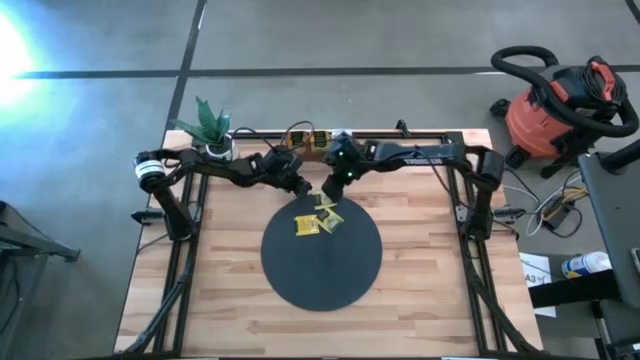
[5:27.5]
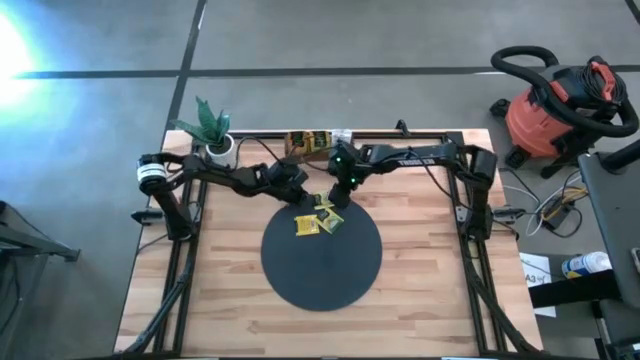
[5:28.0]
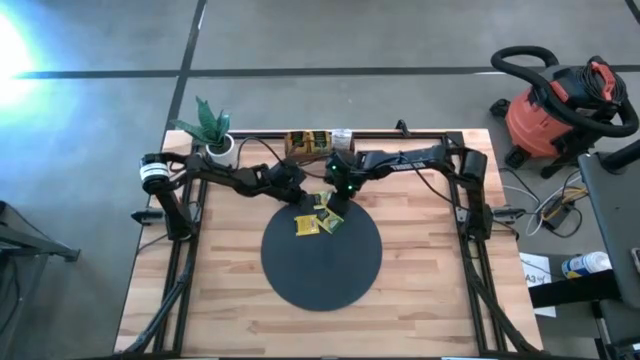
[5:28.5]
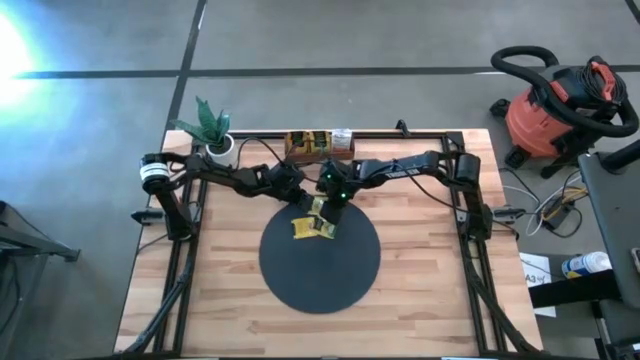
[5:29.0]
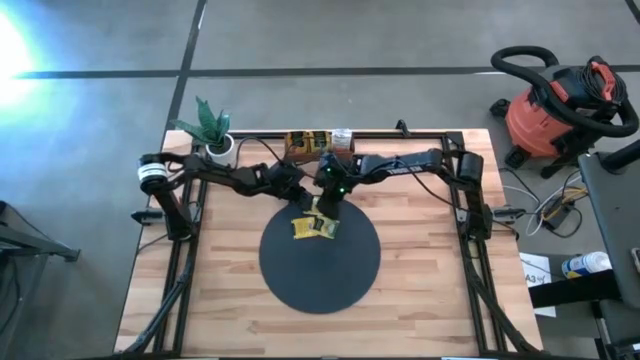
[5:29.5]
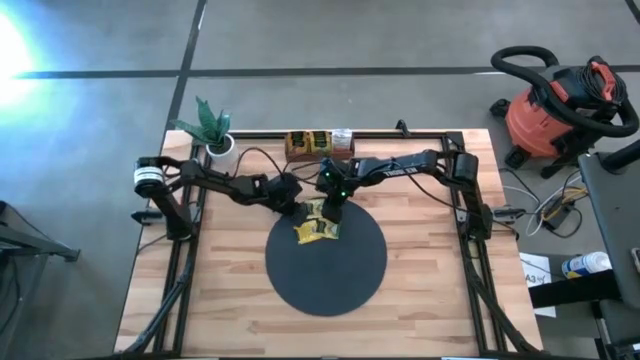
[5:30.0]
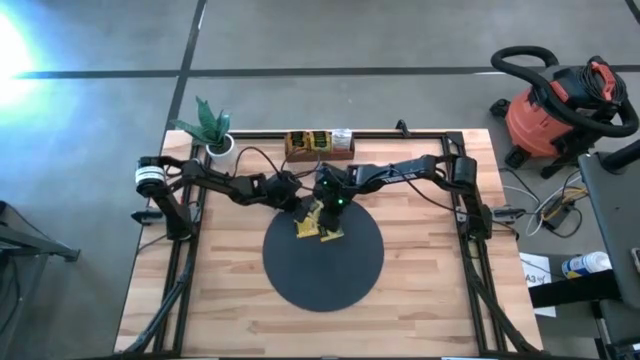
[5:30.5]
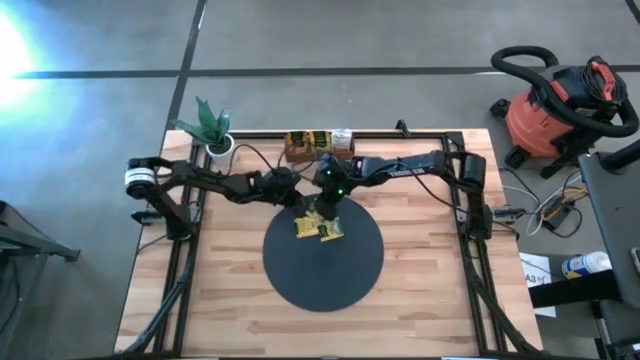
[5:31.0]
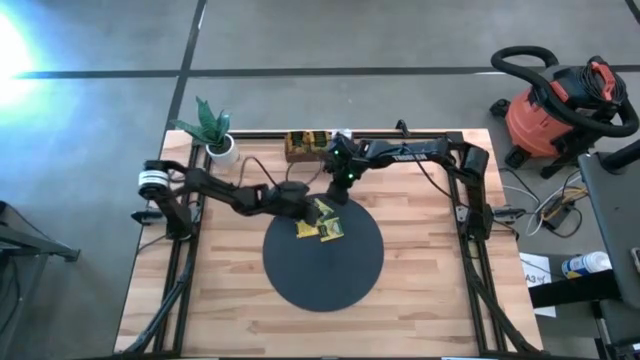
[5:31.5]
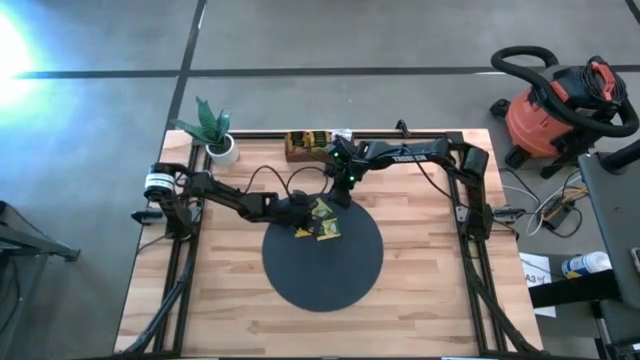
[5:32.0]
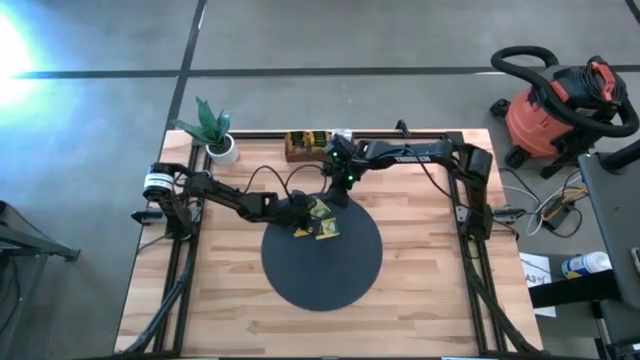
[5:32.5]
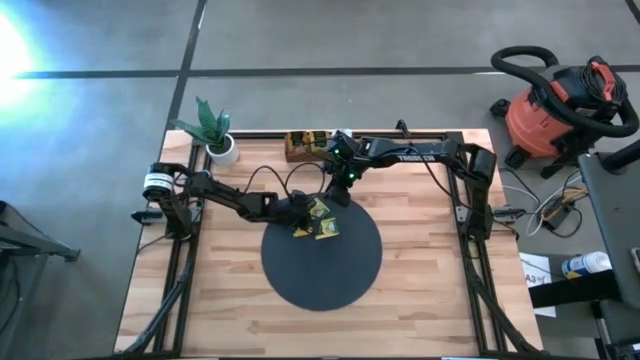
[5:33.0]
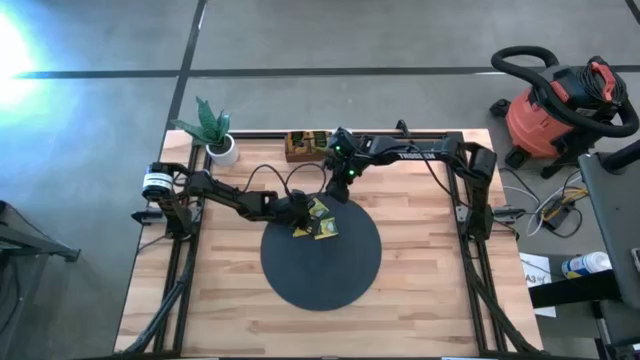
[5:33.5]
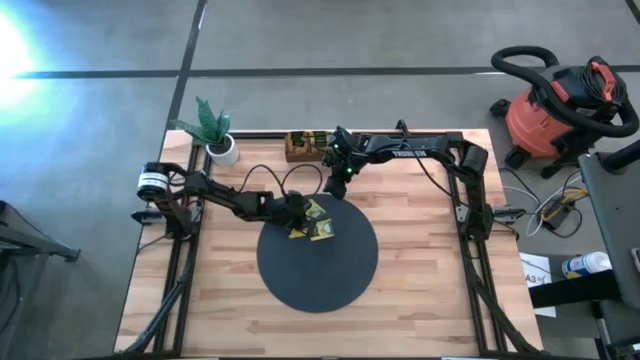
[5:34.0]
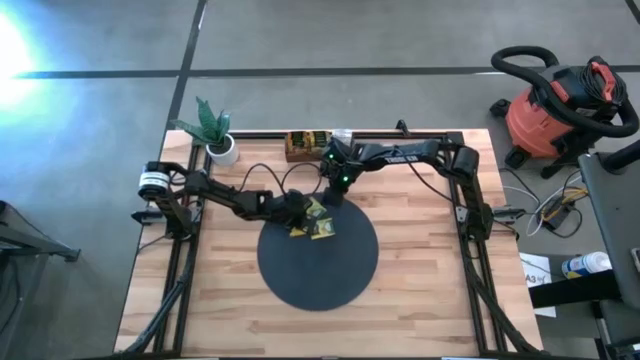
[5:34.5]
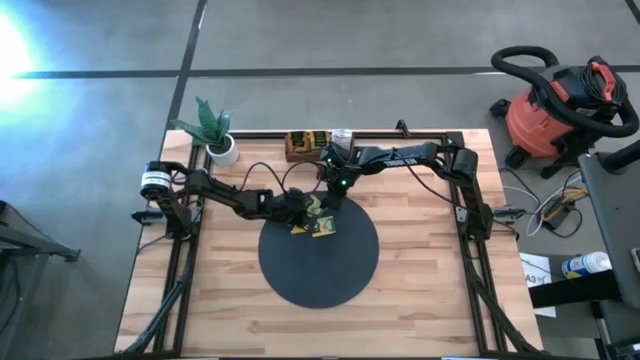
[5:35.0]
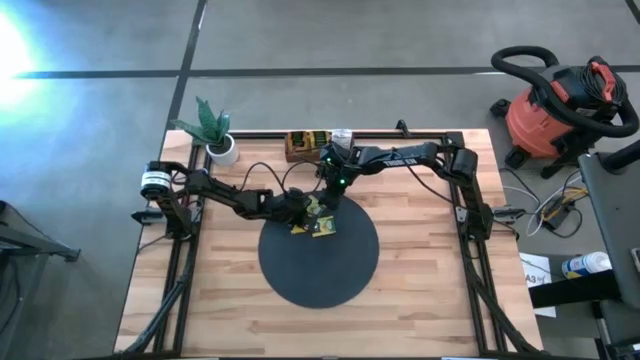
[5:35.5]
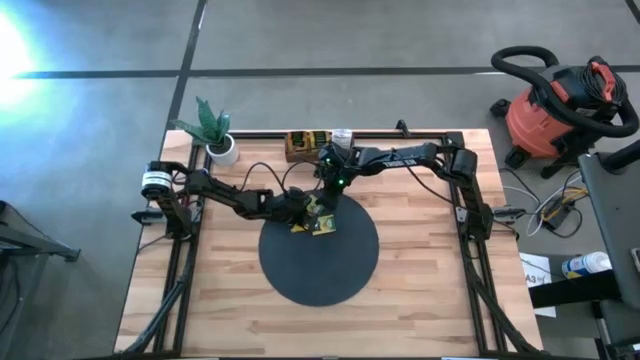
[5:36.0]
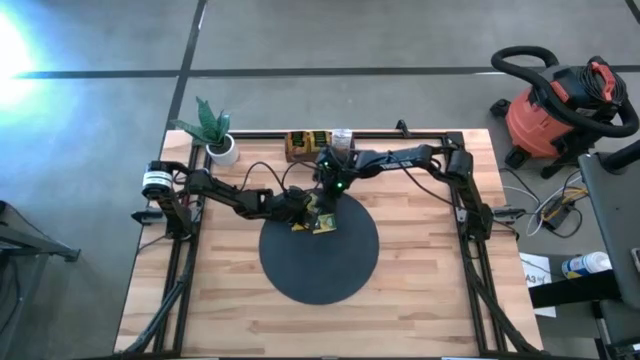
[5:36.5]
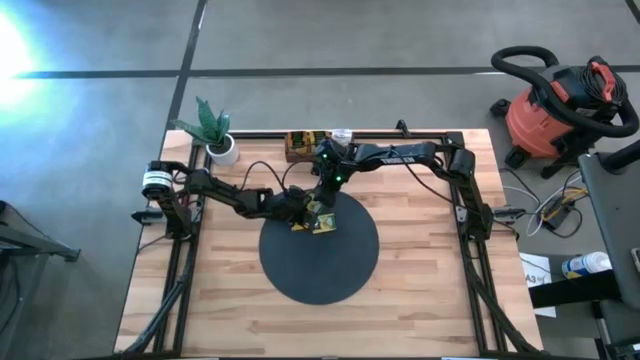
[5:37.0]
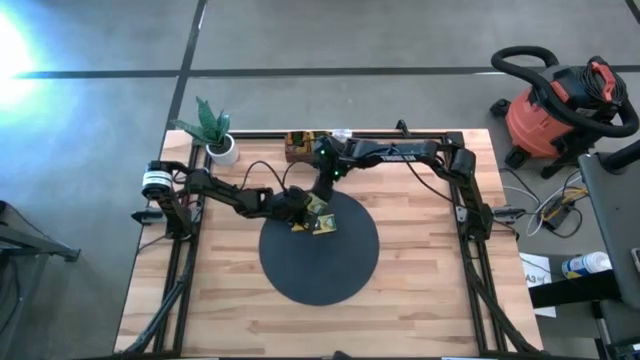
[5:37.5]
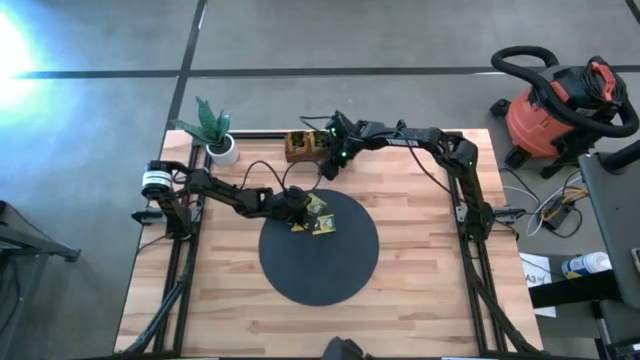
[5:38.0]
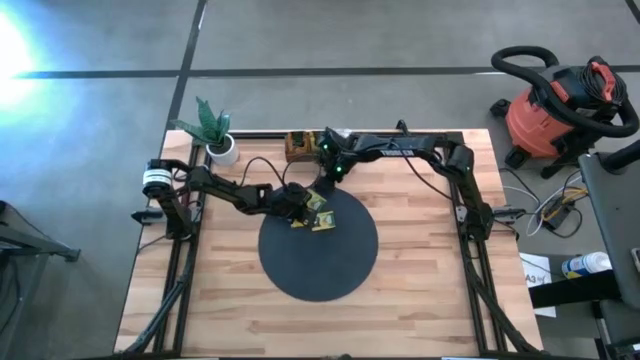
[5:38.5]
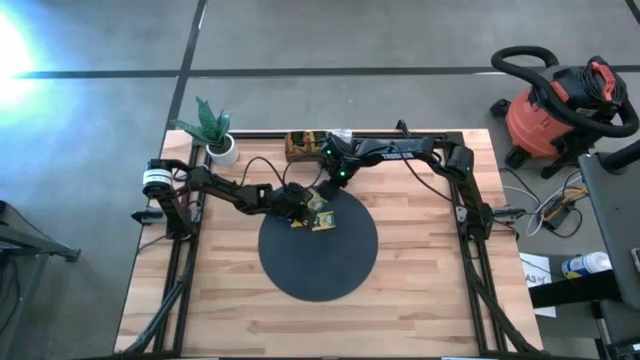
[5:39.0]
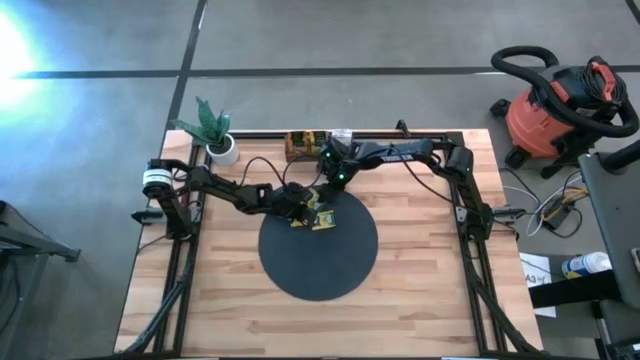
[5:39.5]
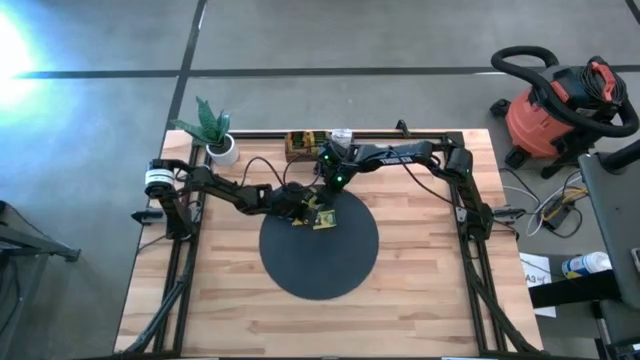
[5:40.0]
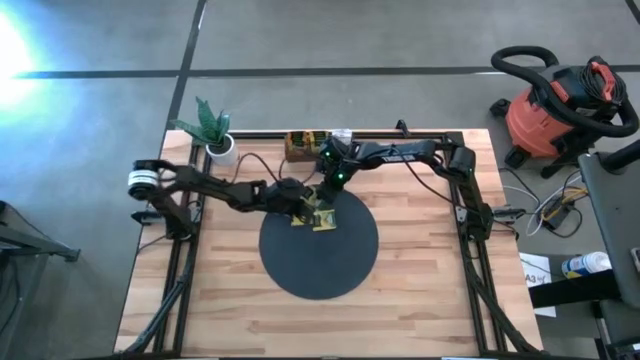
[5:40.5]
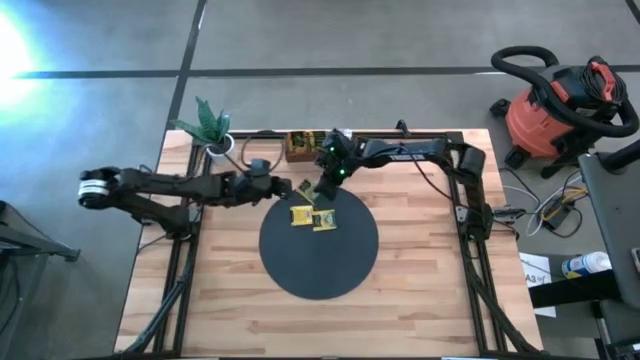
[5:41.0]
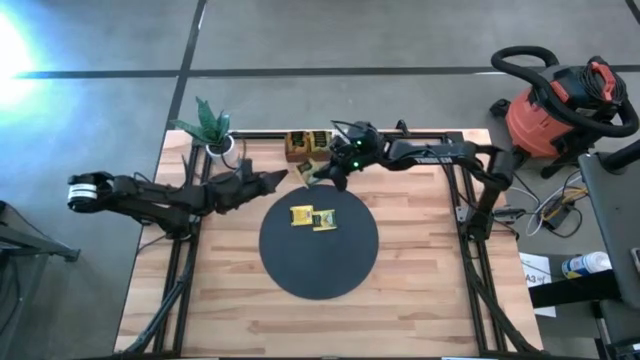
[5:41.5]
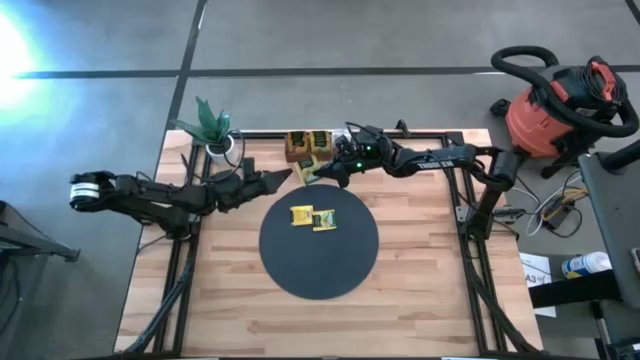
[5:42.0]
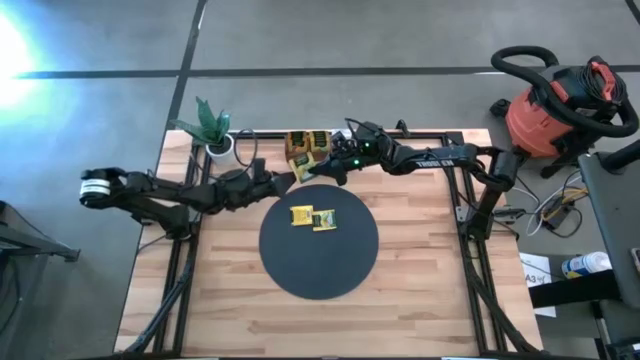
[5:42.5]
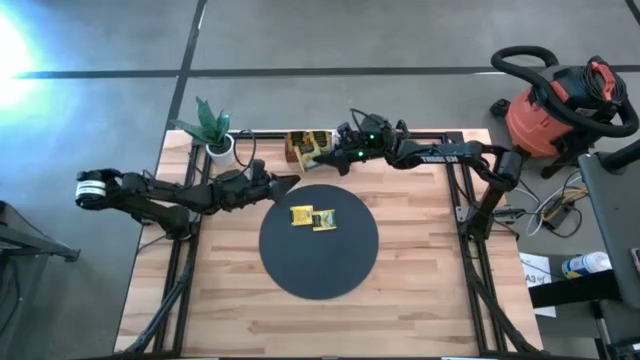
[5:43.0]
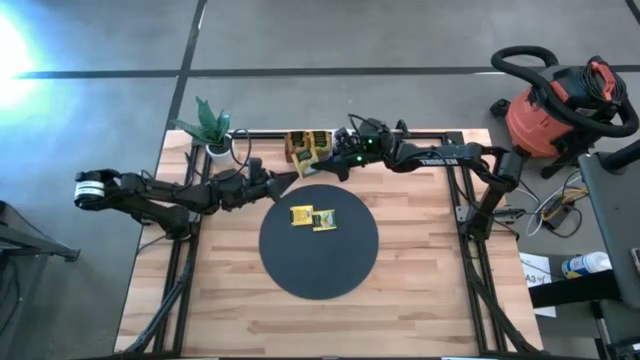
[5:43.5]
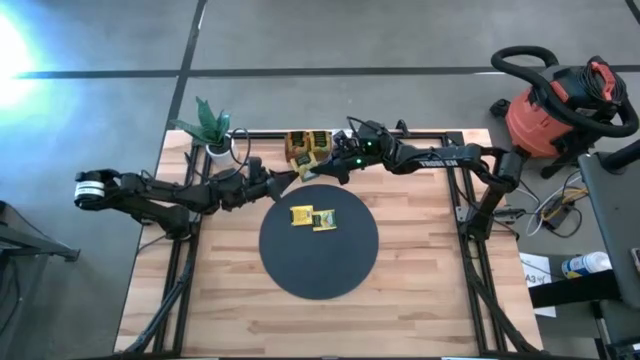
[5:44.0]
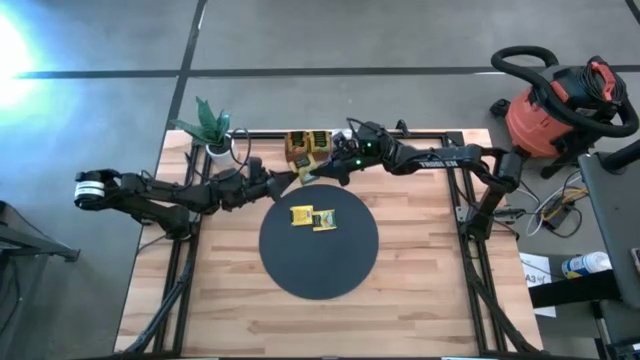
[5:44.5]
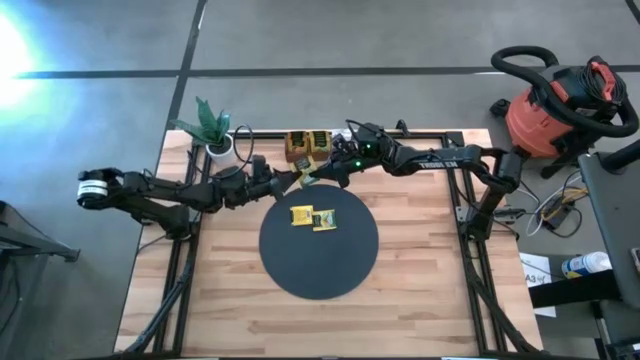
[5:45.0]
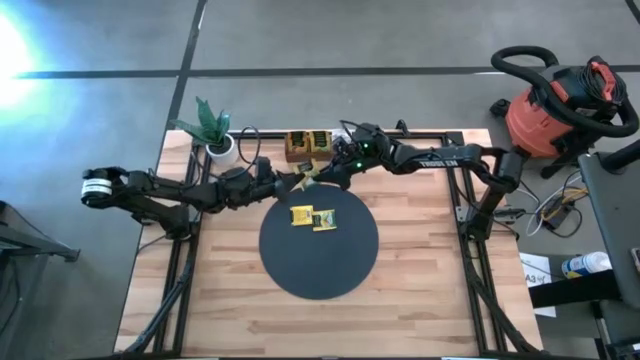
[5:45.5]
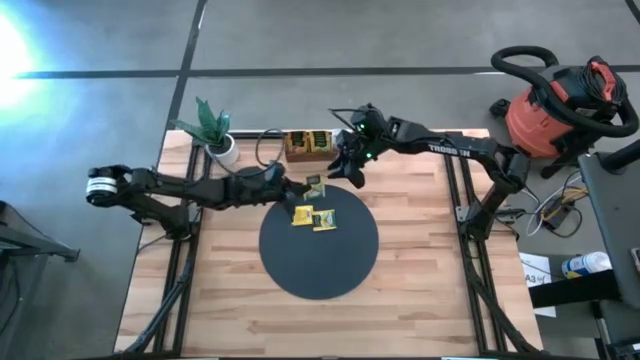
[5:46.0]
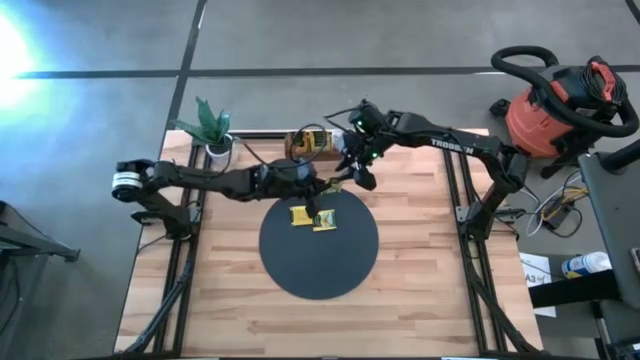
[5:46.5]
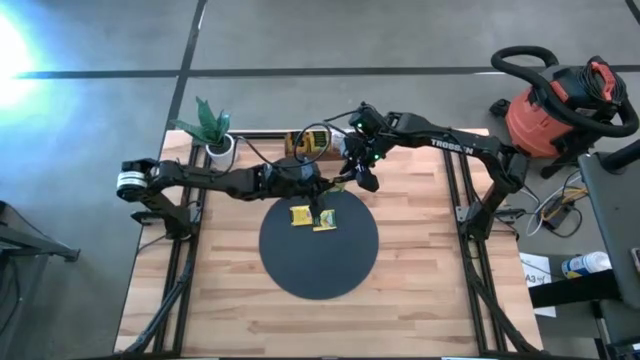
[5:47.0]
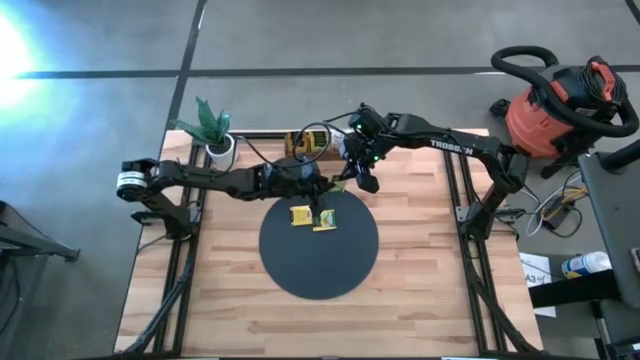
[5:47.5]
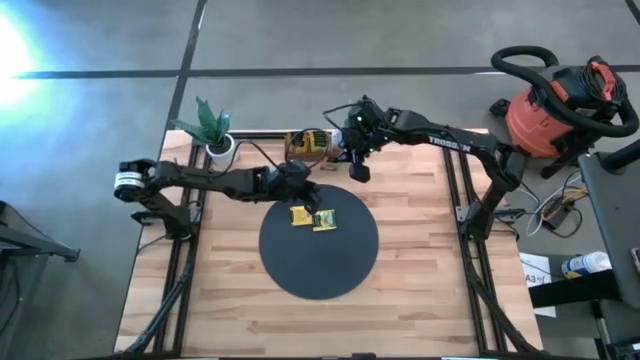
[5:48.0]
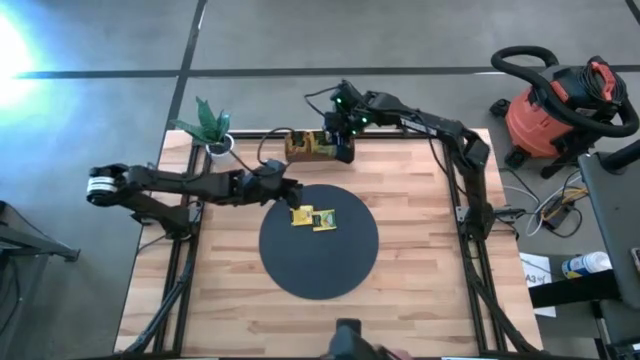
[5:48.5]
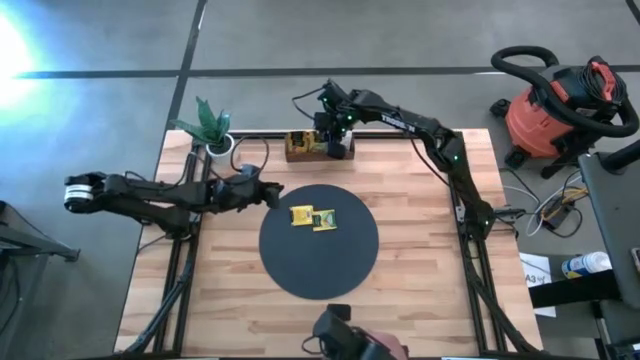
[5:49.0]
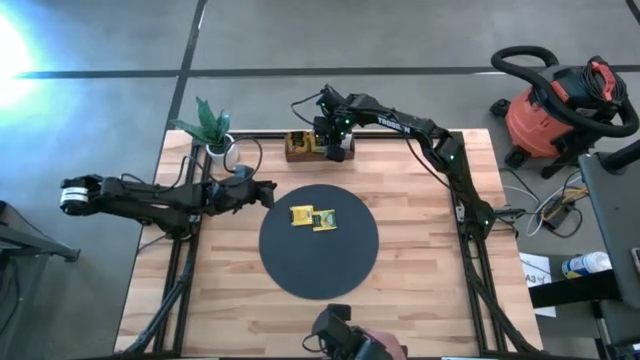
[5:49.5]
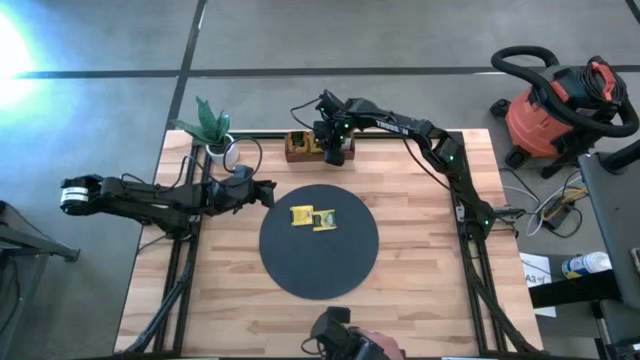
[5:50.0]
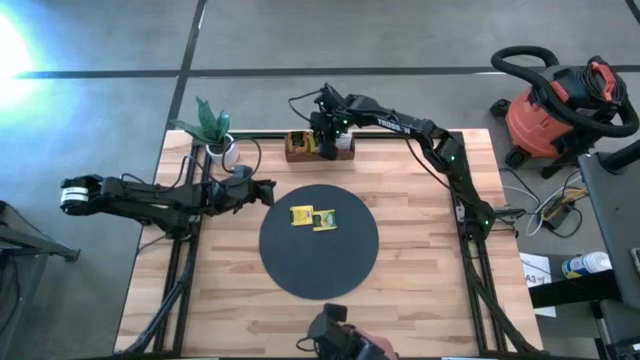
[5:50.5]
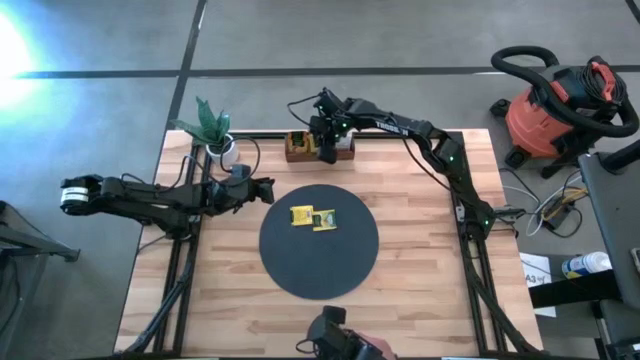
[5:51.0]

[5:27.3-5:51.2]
Task: Pick & Place Tea
Put the yellow tea bag into the middle section of the wooden organizer
